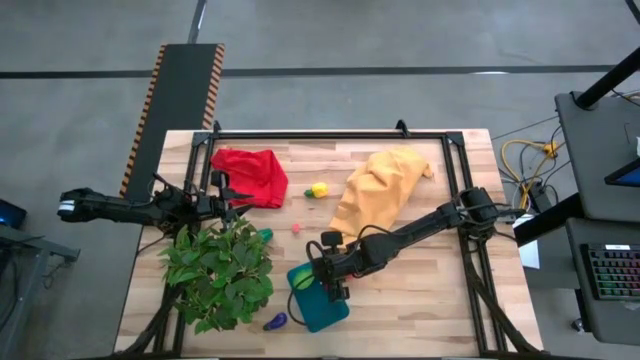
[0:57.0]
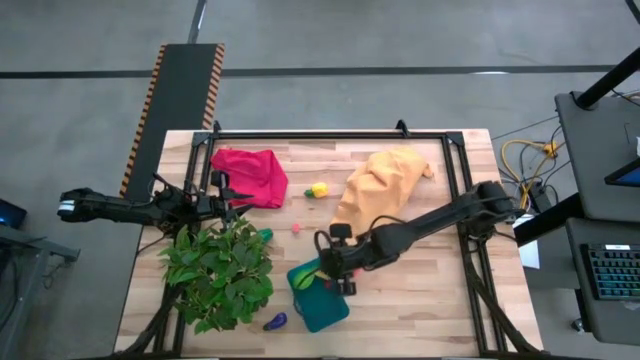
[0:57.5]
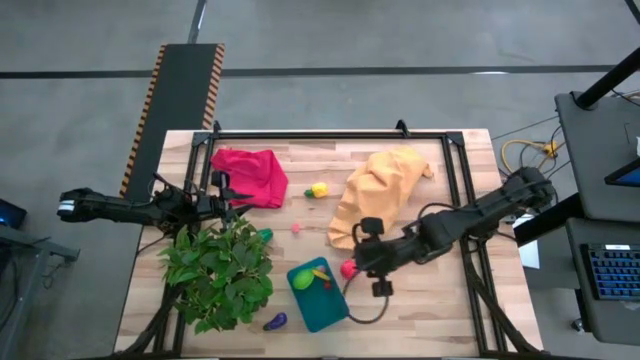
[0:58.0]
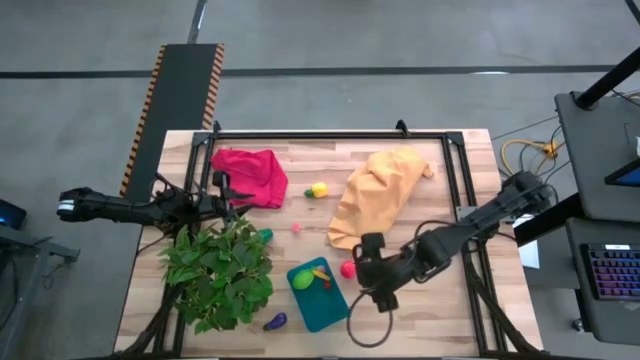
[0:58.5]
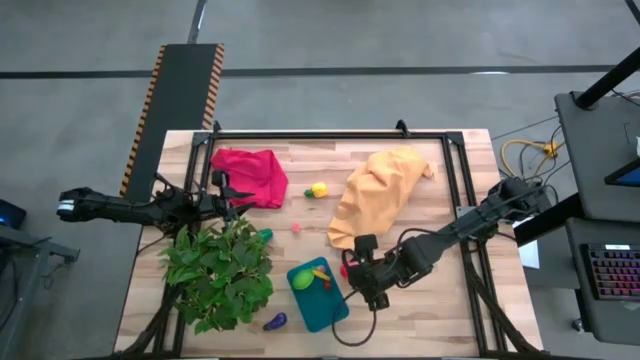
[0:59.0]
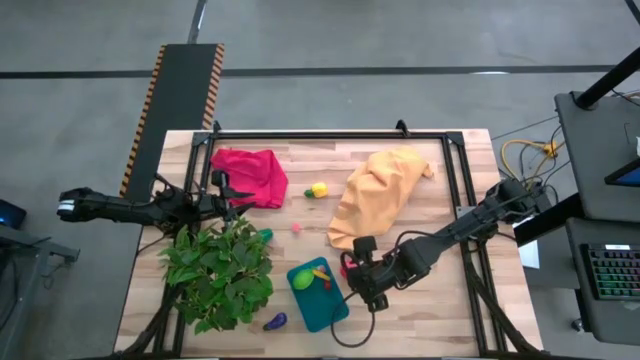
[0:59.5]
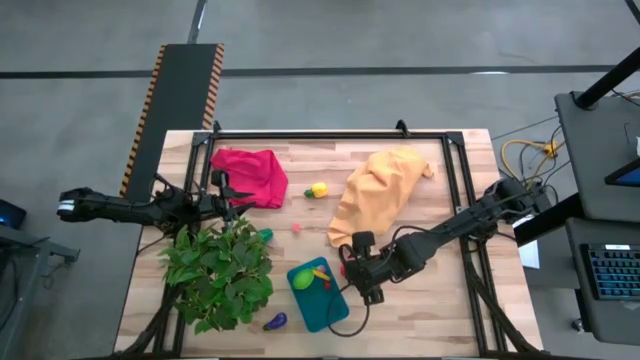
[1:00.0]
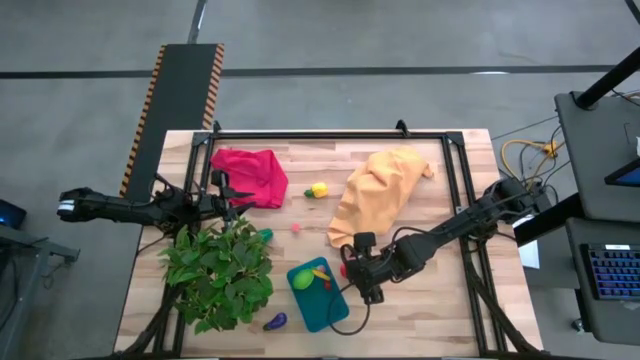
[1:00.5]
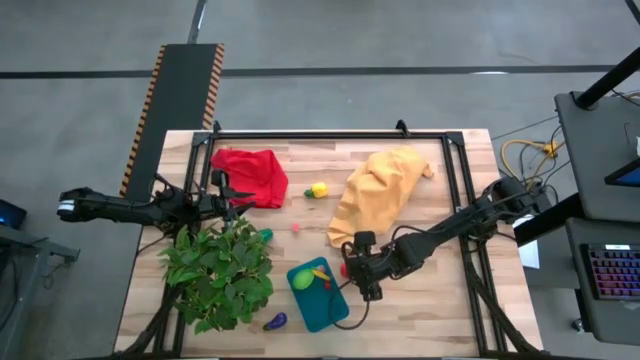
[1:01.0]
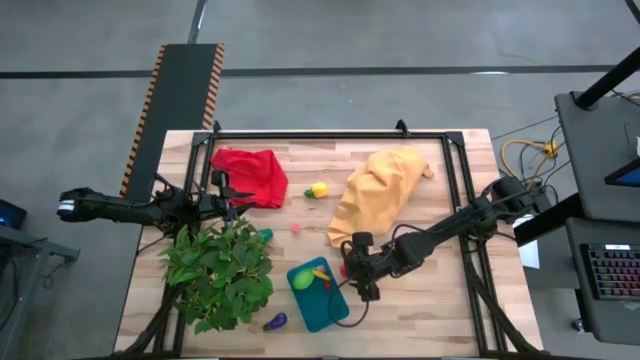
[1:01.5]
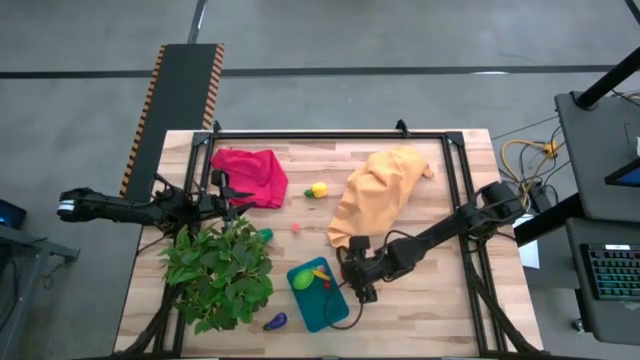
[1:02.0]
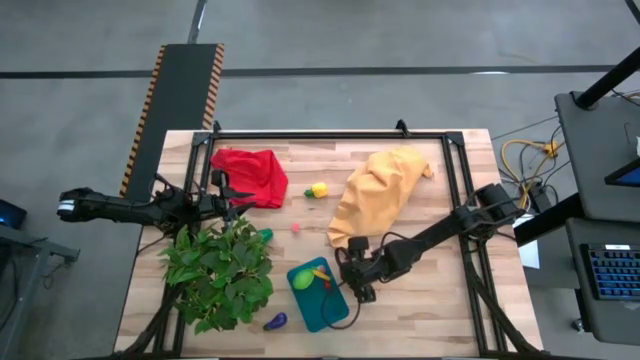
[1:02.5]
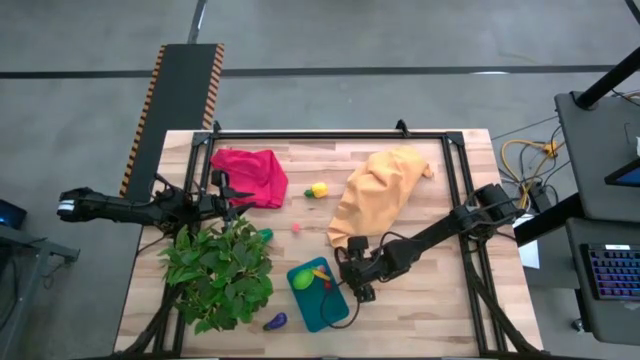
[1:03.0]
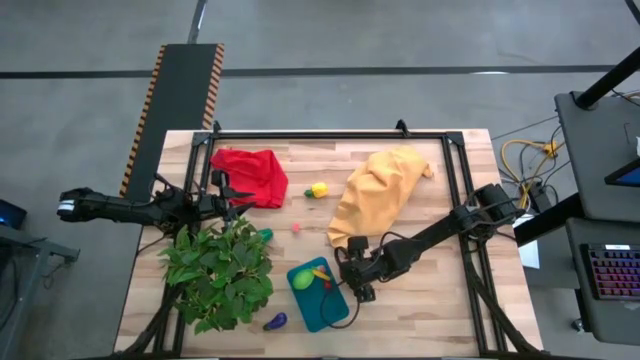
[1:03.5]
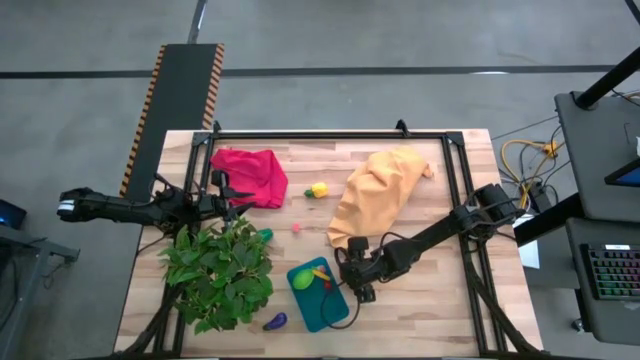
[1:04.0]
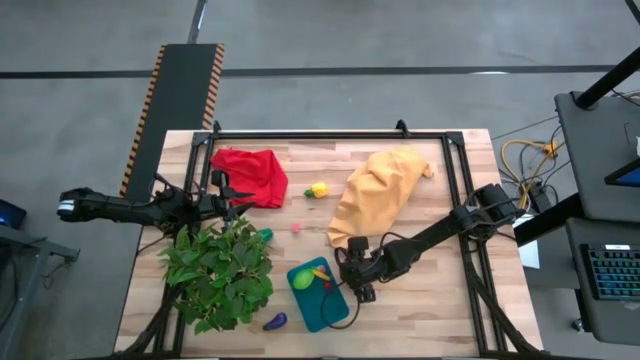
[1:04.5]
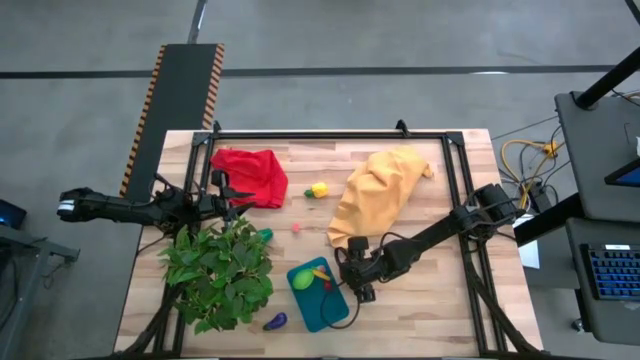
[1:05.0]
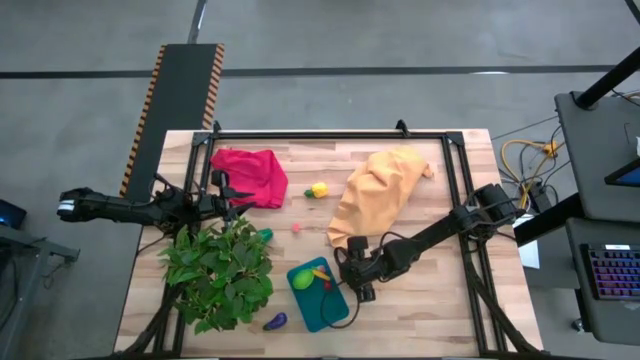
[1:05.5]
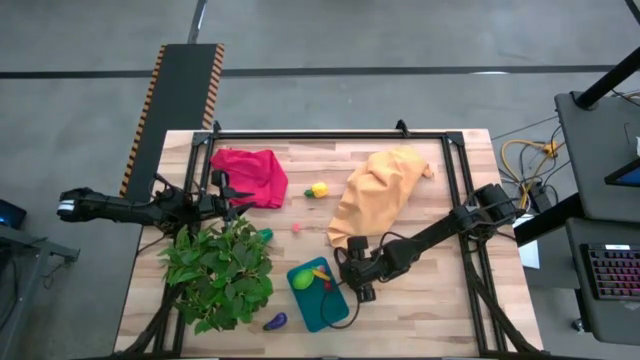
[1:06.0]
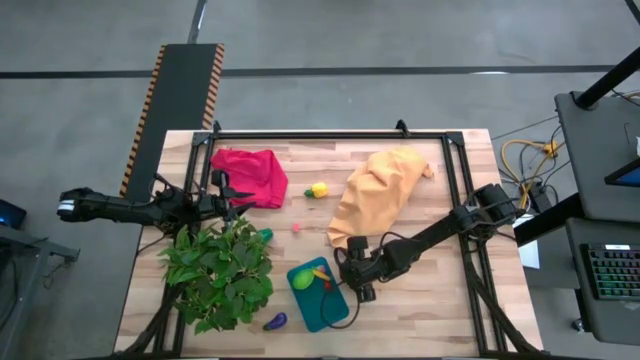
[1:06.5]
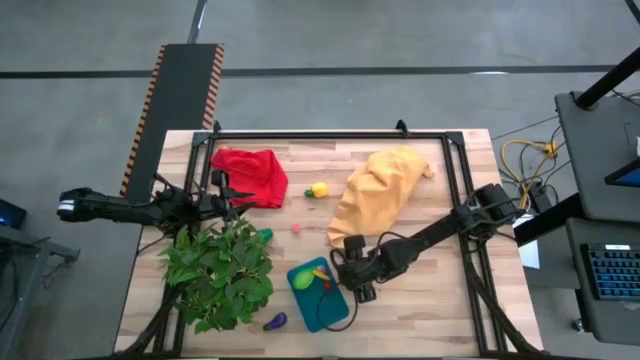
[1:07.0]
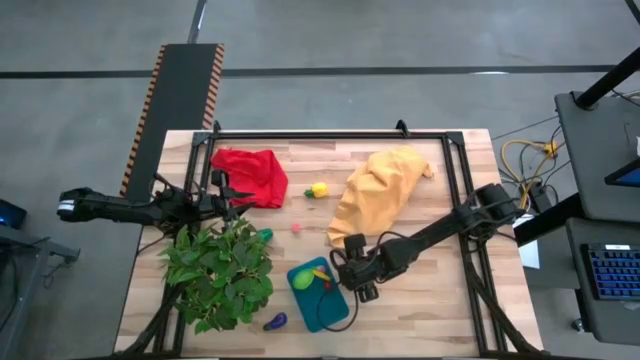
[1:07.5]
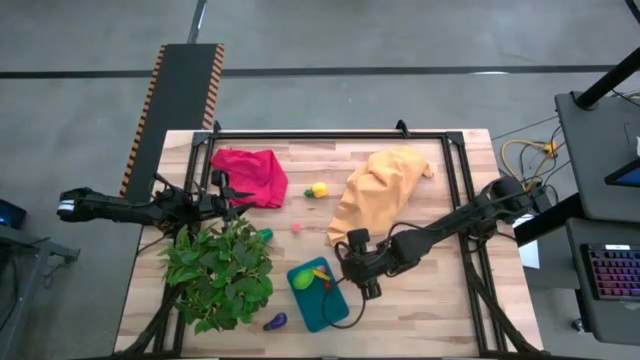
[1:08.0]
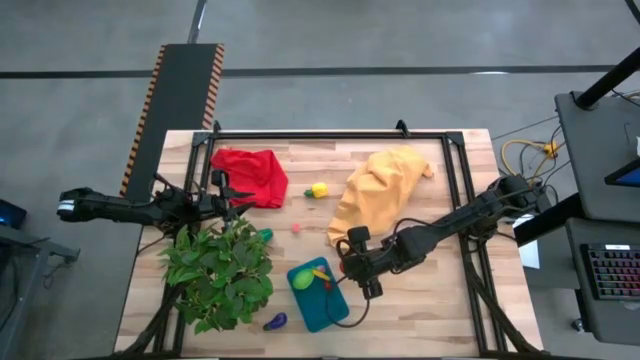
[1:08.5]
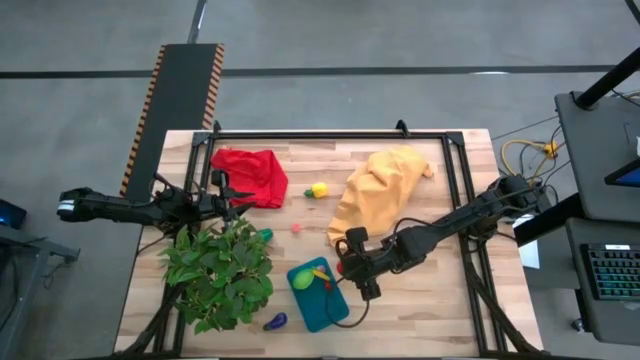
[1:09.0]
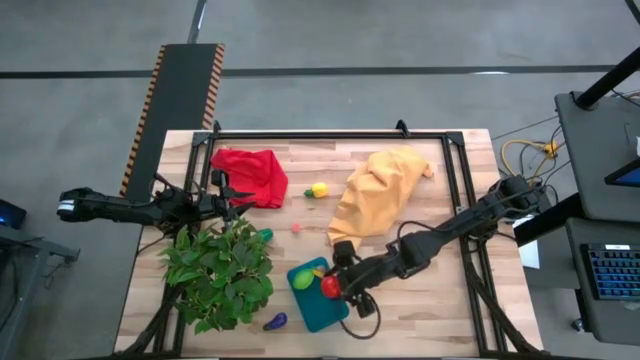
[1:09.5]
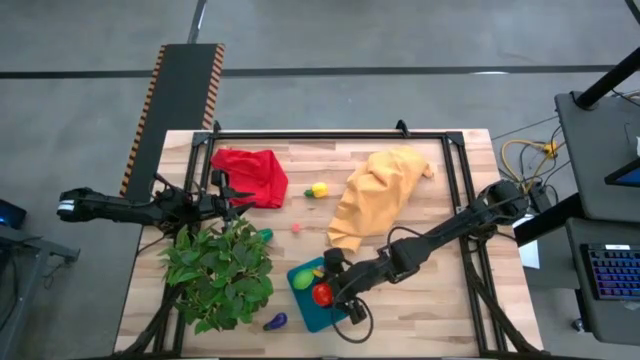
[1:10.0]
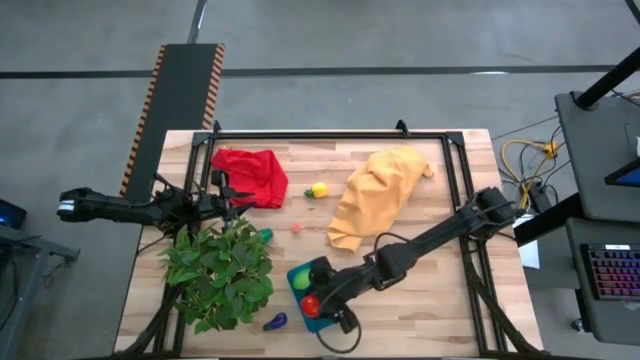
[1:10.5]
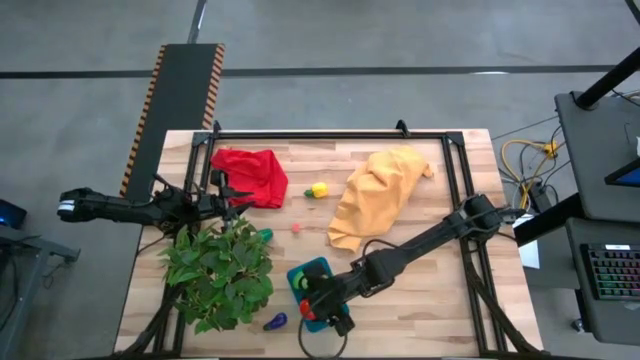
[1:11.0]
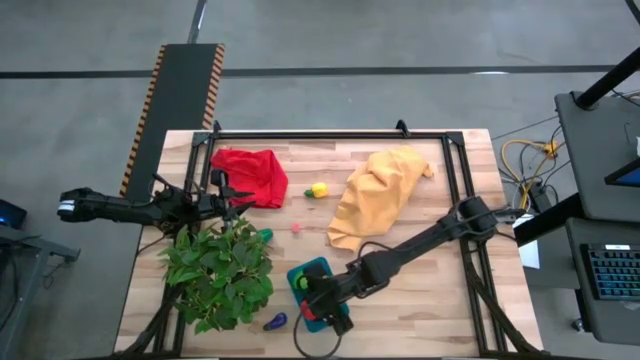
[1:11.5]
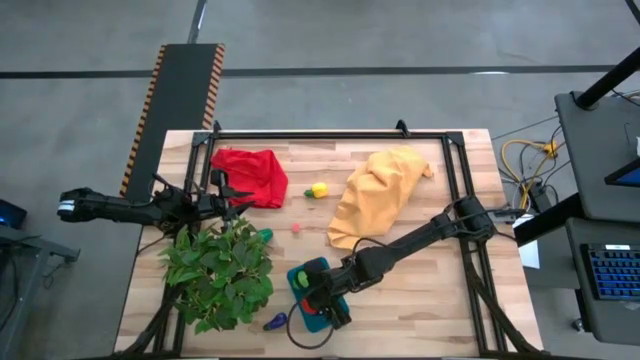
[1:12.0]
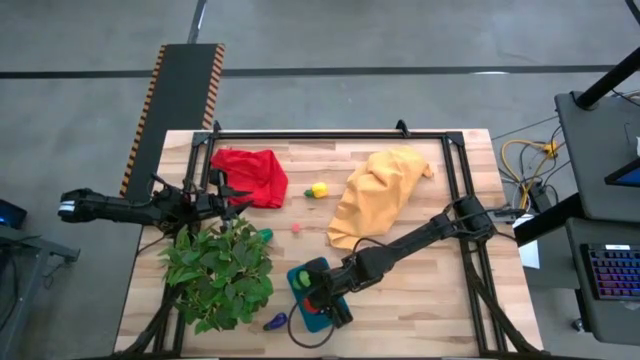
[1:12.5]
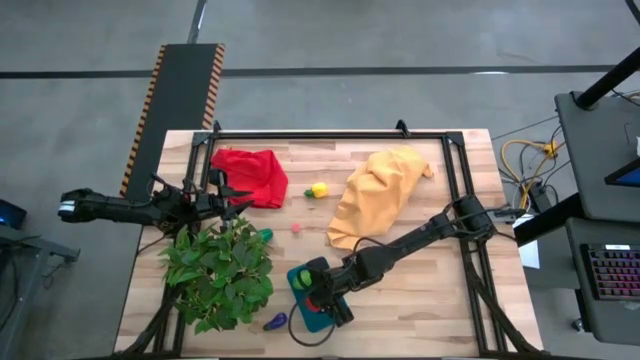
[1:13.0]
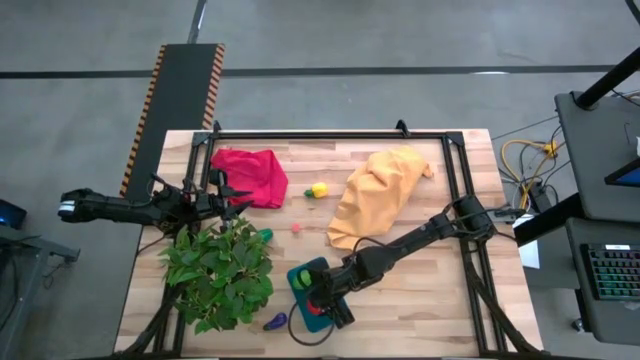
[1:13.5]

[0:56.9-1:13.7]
Task: Pick and placing Produce into tupperware
Put the tomato into the bin

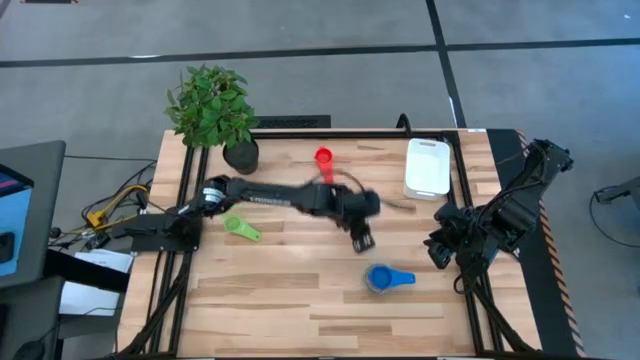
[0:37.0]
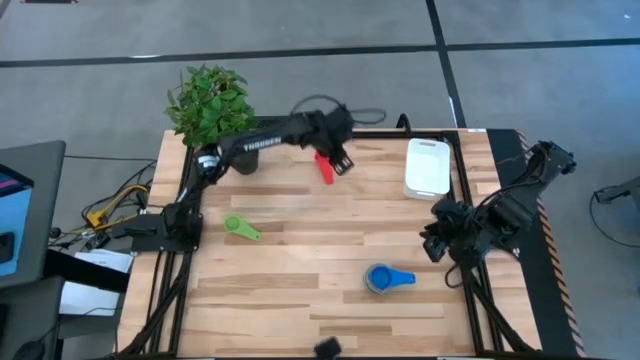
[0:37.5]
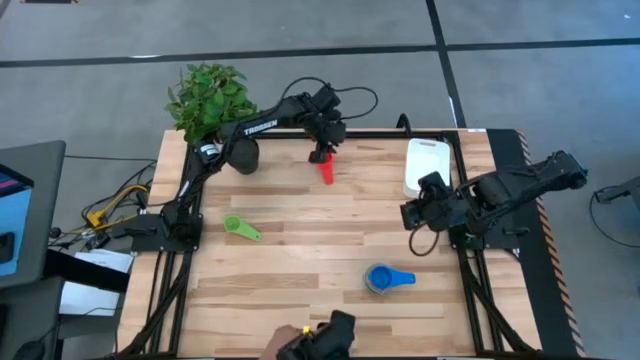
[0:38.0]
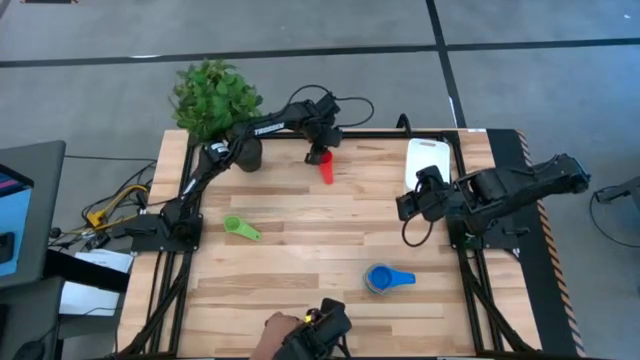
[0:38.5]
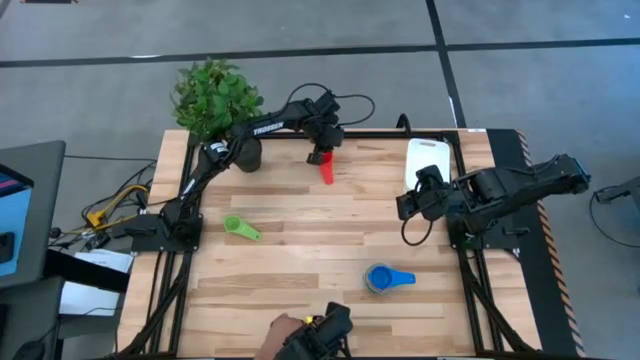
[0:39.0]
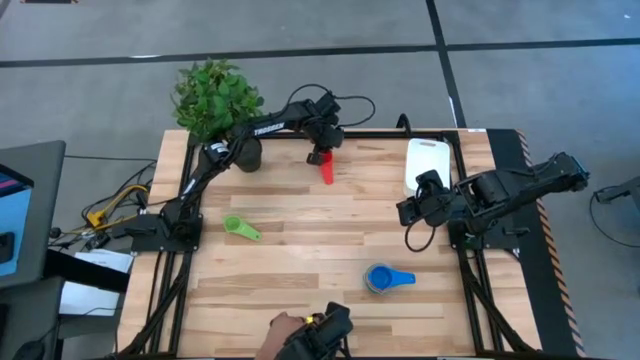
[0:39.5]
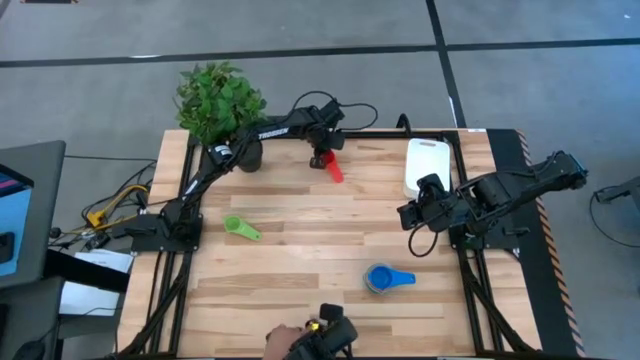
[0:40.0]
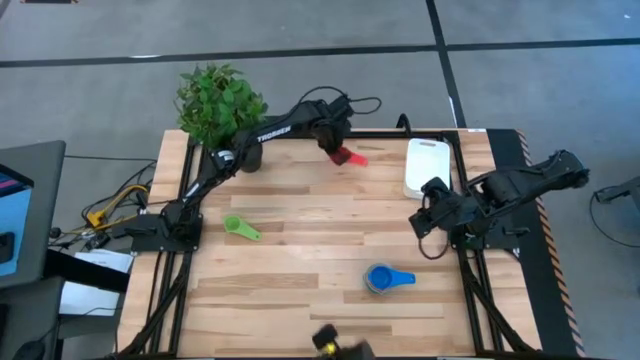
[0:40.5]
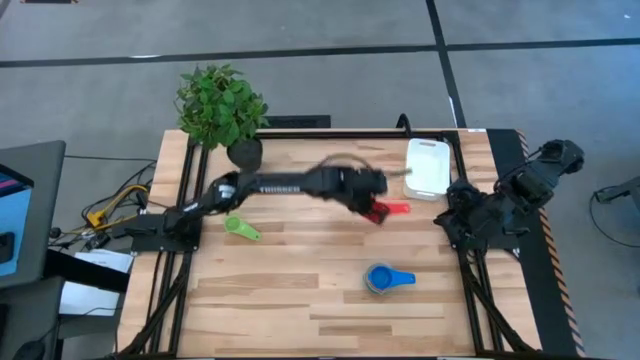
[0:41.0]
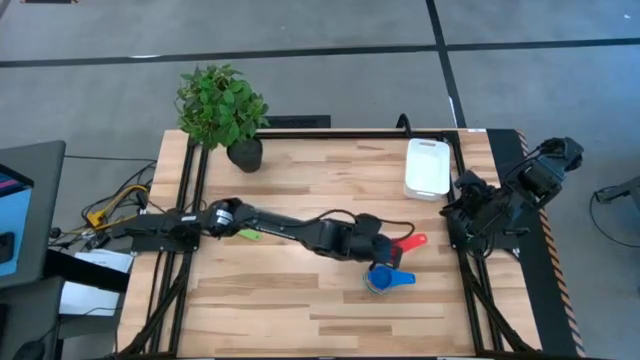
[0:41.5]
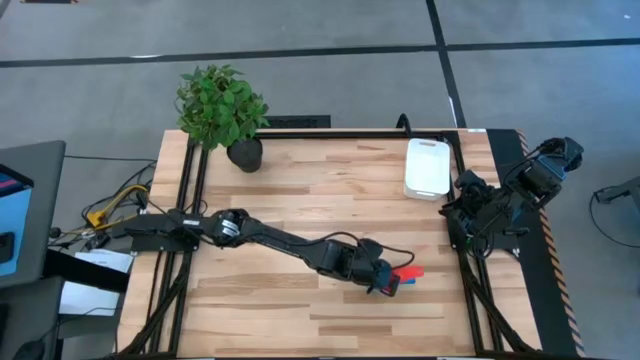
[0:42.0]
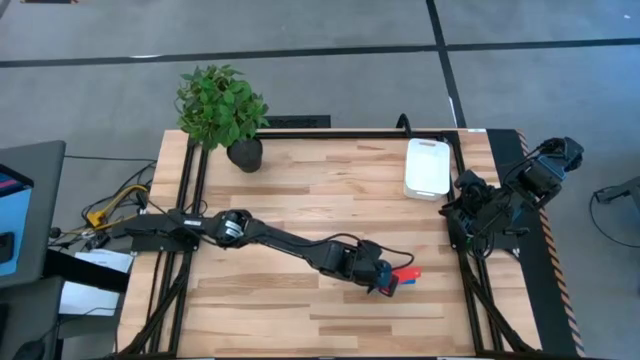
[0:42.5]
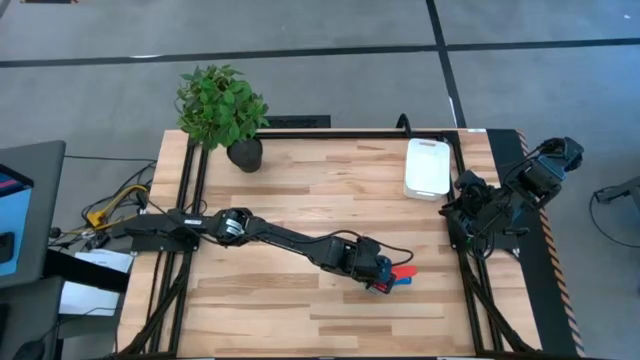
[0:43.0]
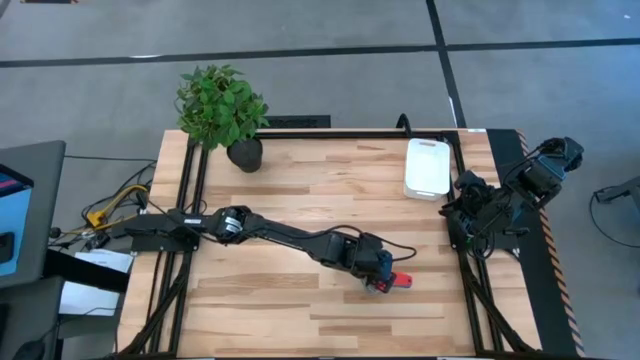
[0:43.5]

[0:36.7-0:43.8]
Task: Nest measuring cups in basket
Stack the red measuring cup on the blue measuring cup
